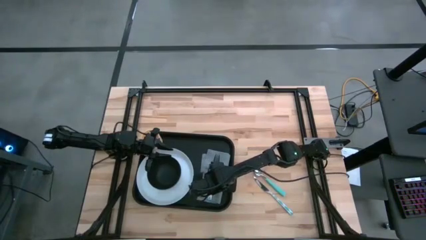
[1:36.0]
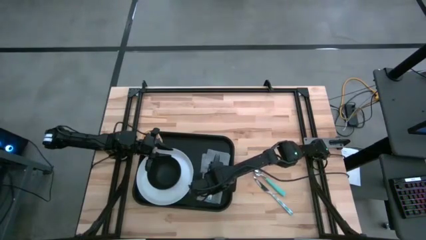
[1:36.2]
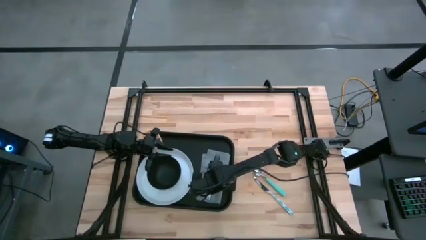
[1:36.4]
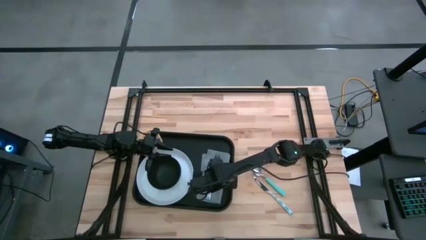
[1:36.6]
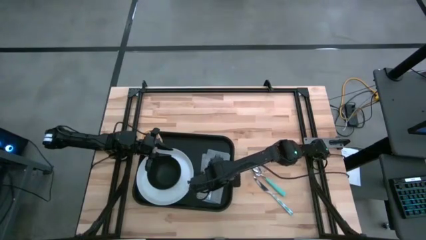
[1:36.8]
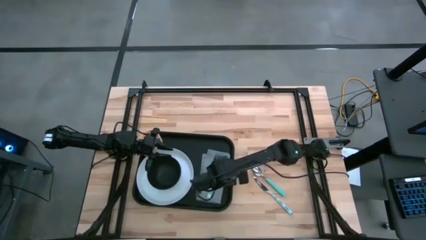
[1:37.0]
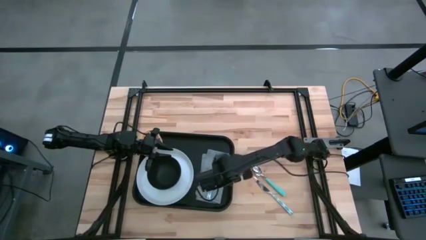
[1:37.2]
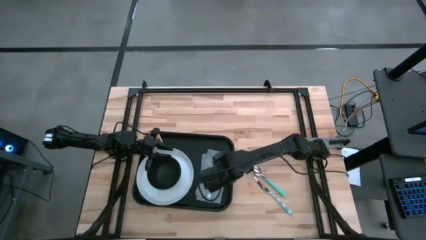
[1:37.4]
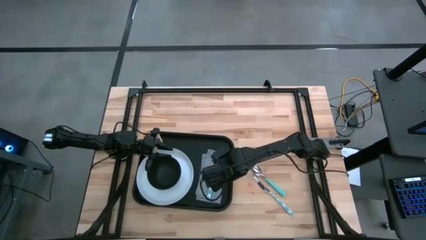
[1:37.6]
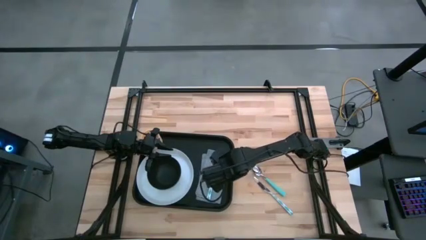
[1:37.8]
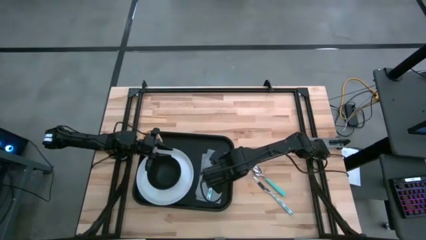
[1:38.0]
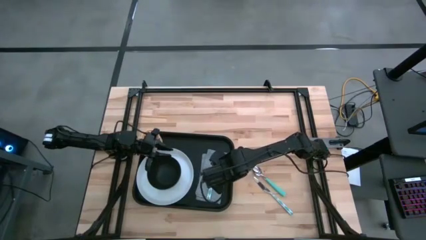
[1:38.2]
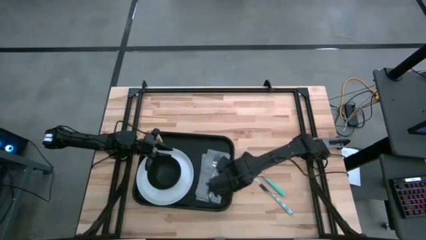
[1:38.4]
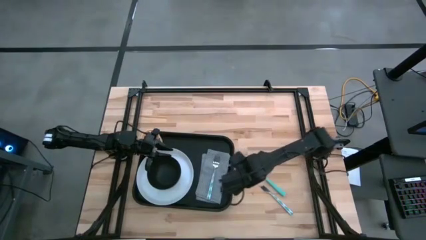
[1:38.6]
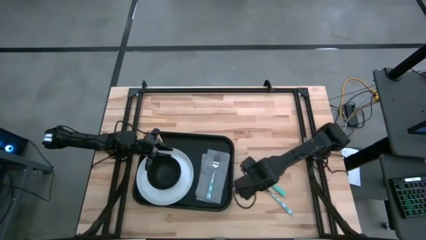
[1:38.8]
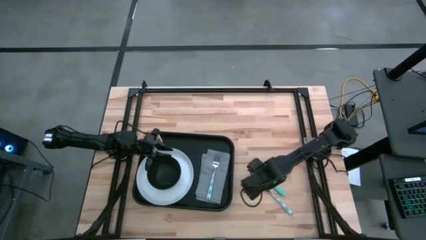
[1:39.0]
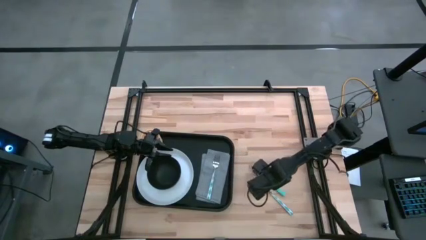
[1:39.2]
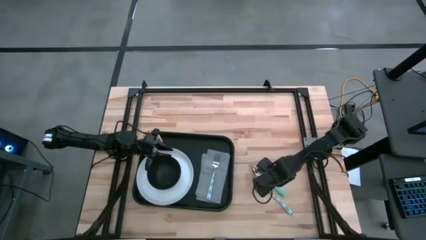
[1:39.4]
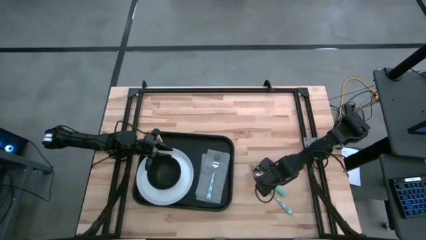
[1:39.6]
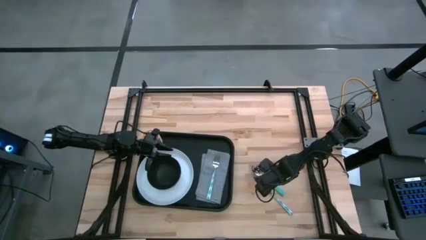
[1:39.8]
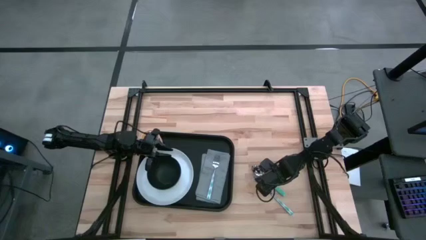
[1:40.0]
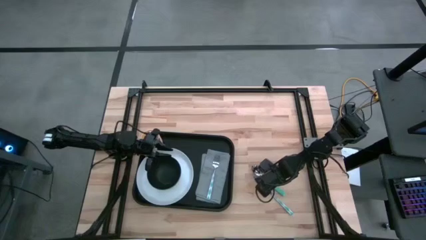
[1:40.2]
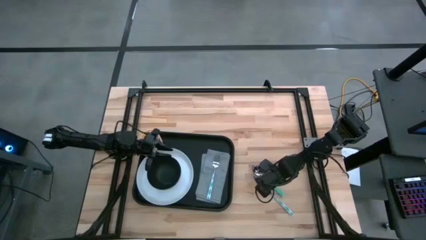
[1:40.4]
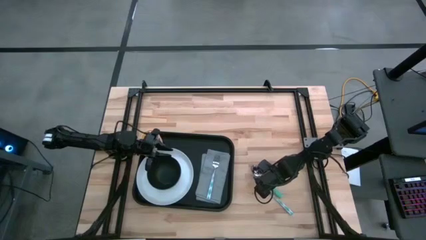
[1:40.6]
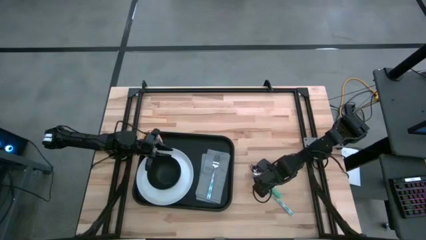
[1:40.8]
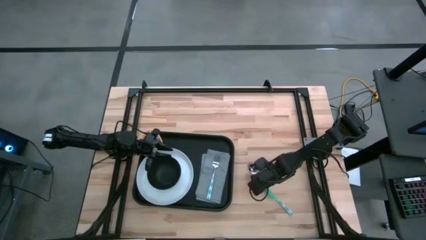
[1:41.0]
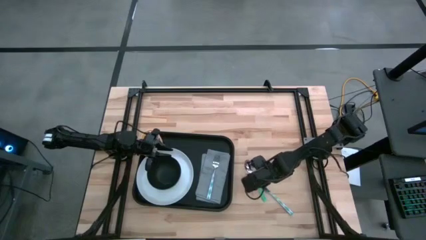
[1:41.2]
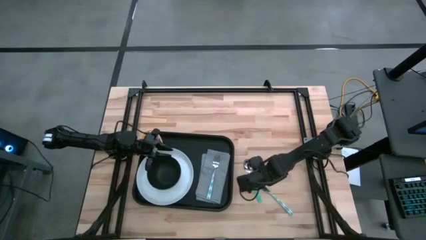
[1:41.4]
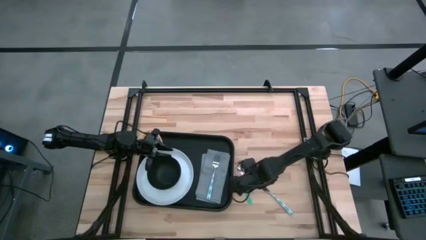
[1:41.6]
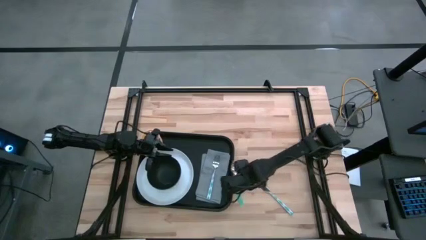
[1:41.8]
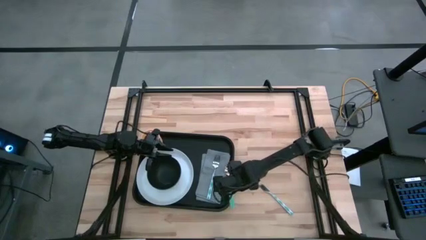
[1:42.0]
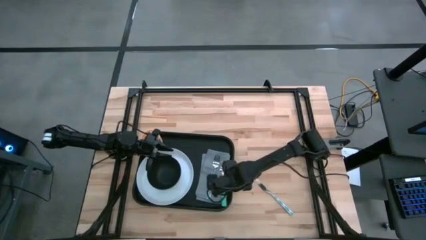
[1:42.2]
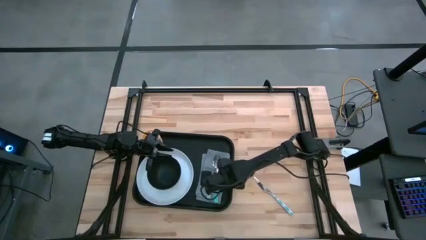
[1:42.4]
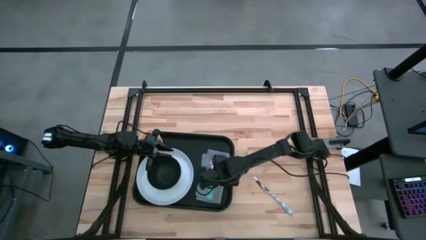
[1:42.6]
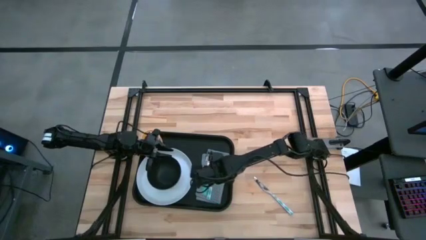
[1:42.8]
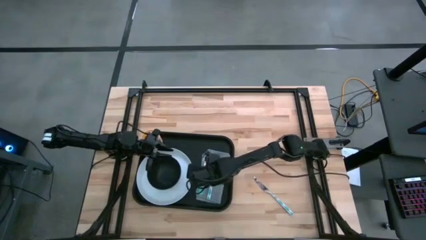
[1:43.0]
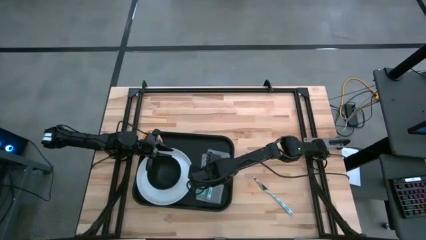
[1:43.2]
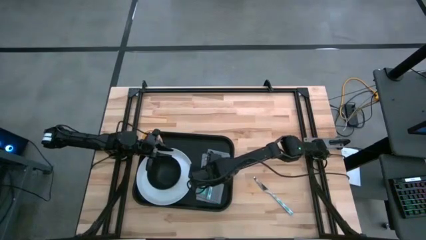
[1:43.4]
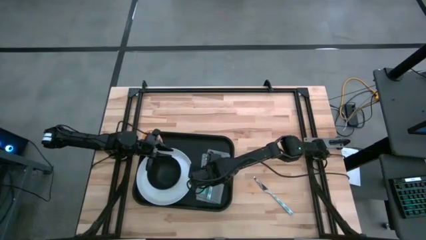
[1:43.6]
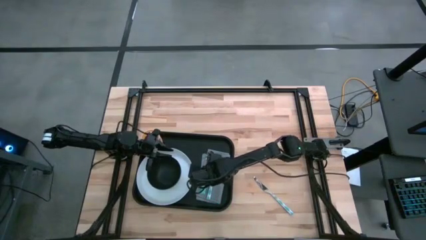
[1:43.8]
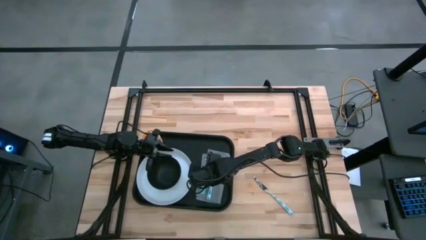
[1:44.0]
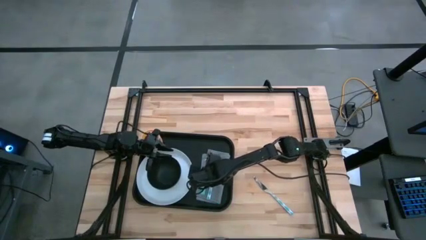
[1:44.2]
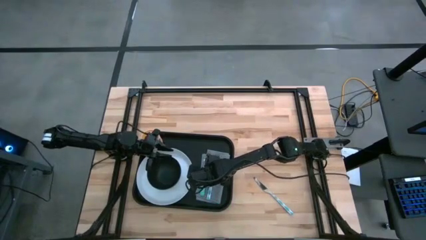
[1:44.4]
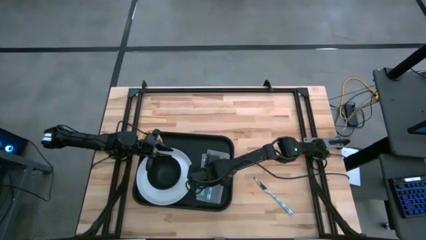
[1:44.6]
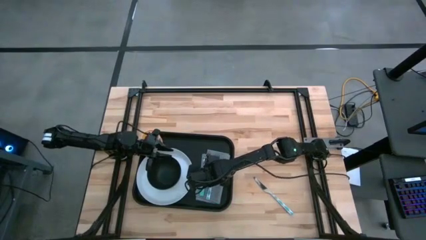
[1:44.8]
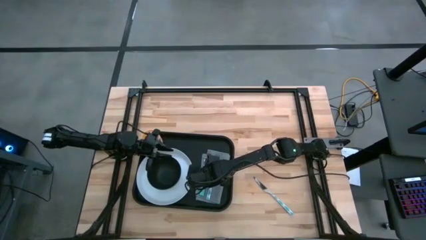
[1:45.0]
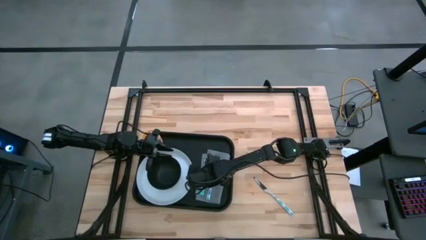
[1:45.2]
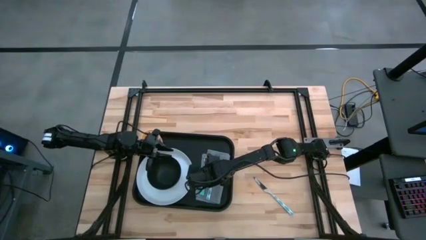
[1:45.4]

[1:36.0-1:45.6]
Task: Set up tray
Put the blue spoon on the gray napkin

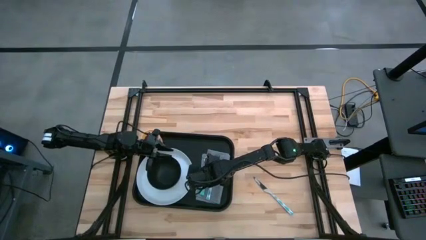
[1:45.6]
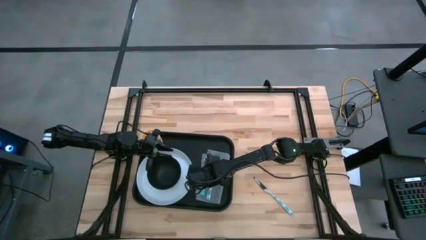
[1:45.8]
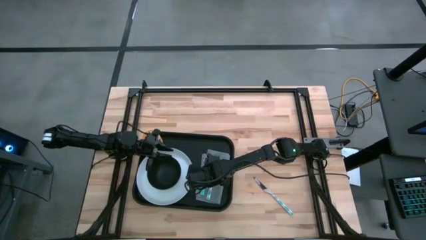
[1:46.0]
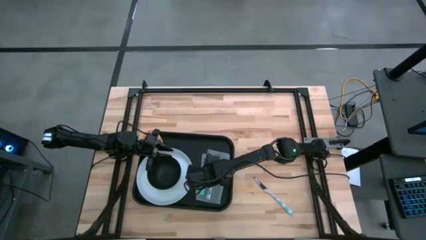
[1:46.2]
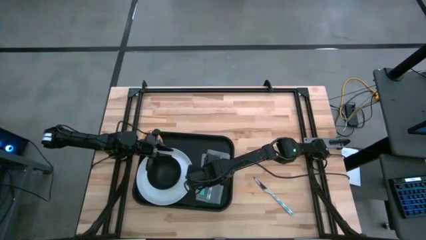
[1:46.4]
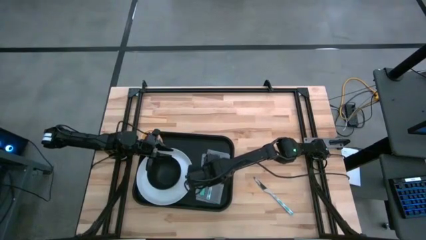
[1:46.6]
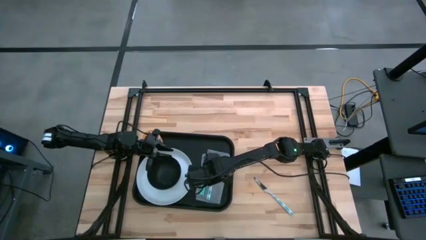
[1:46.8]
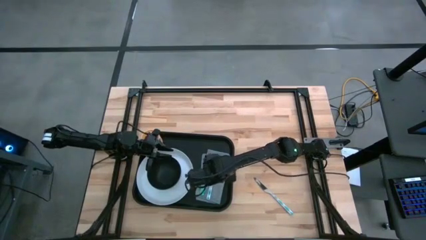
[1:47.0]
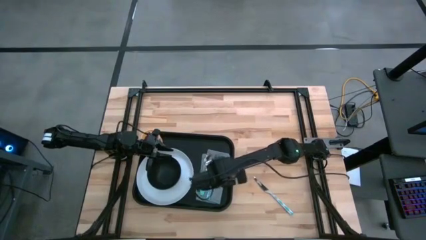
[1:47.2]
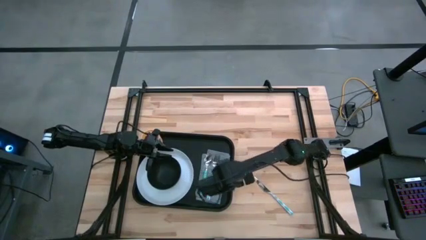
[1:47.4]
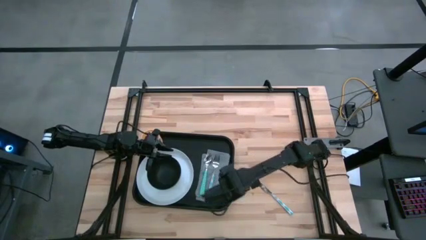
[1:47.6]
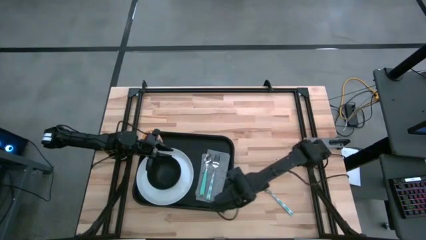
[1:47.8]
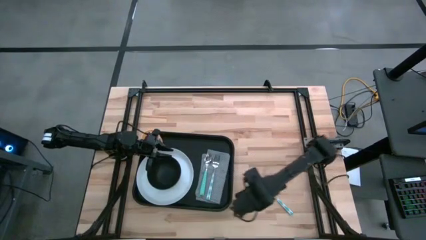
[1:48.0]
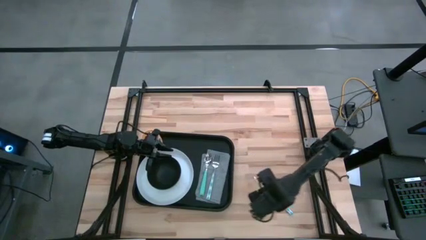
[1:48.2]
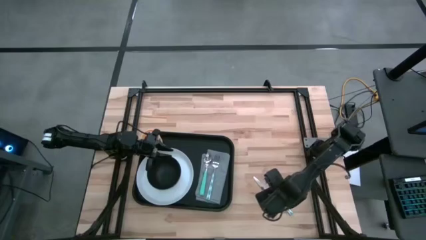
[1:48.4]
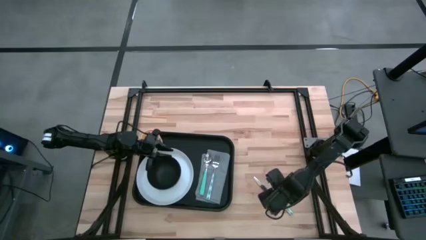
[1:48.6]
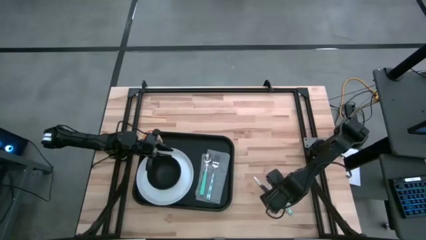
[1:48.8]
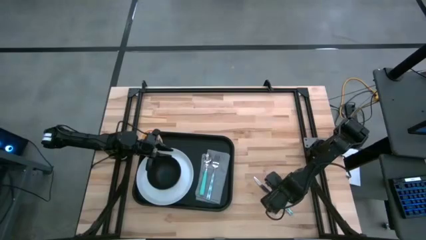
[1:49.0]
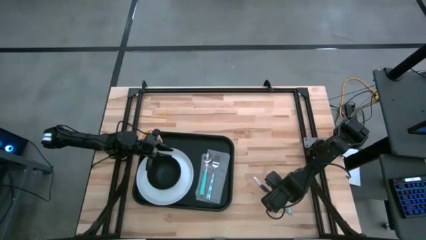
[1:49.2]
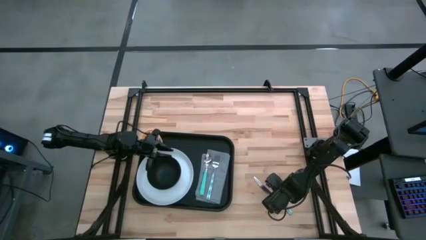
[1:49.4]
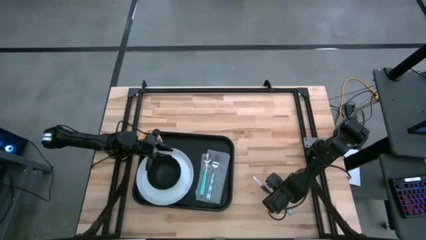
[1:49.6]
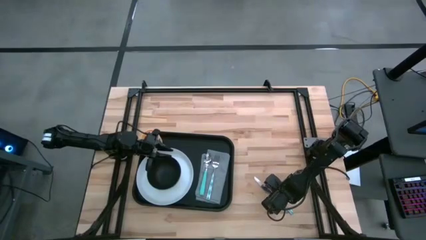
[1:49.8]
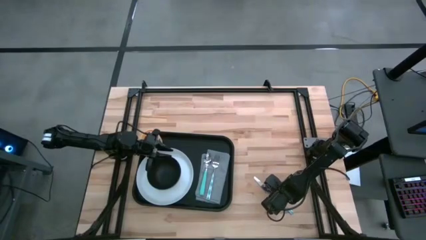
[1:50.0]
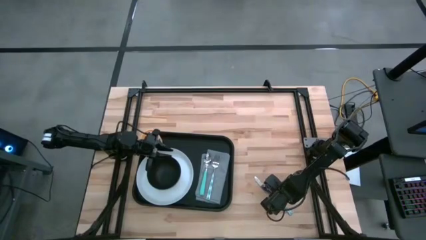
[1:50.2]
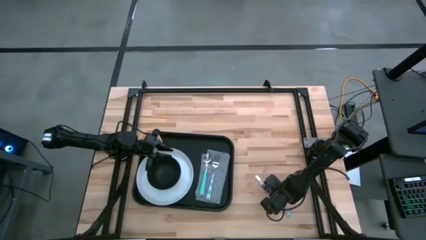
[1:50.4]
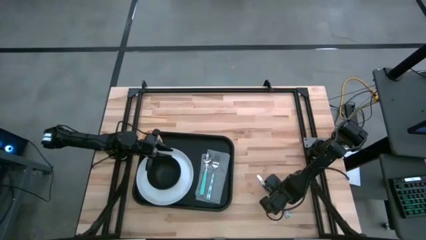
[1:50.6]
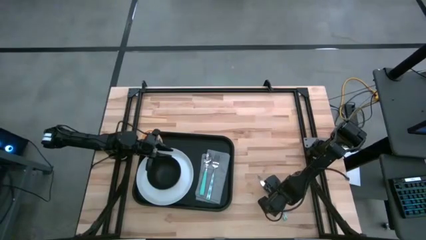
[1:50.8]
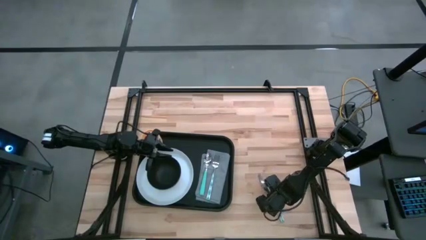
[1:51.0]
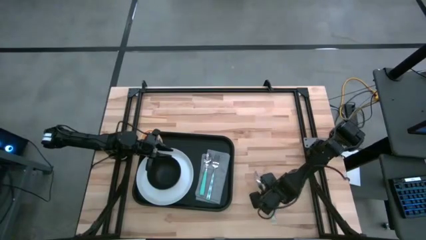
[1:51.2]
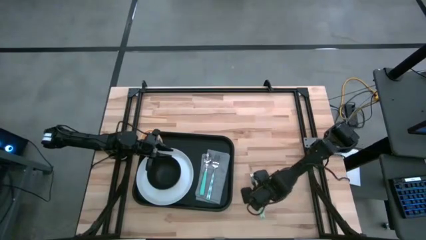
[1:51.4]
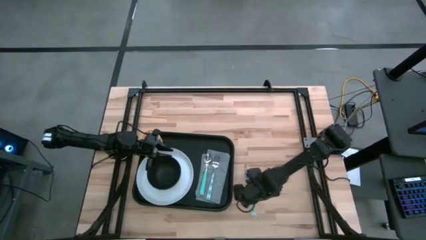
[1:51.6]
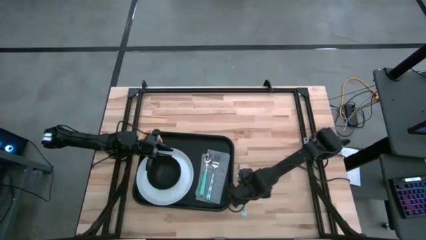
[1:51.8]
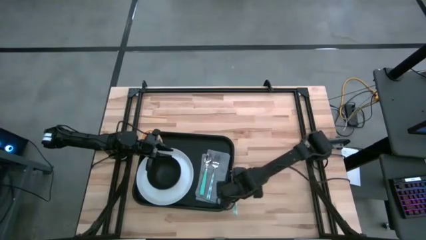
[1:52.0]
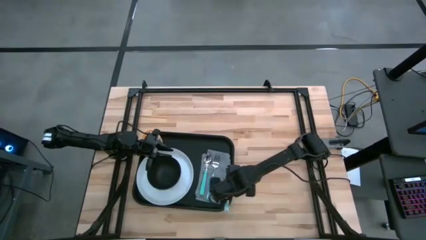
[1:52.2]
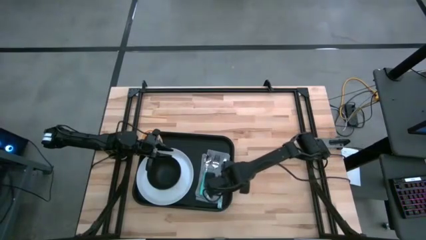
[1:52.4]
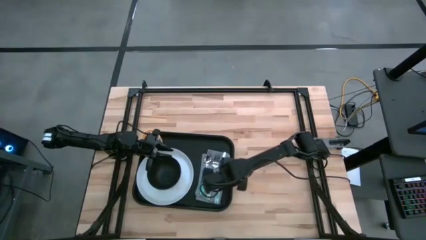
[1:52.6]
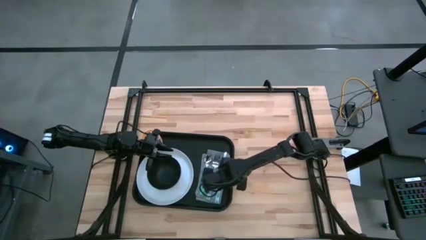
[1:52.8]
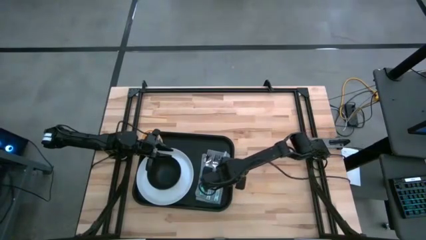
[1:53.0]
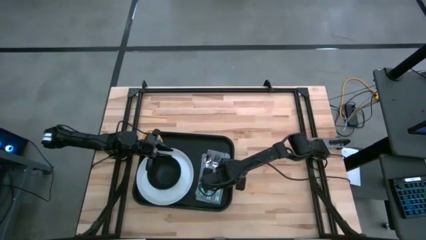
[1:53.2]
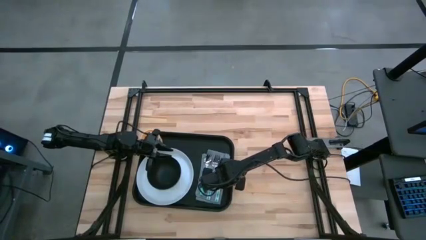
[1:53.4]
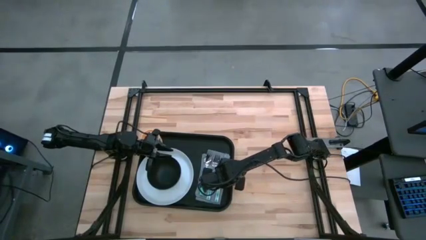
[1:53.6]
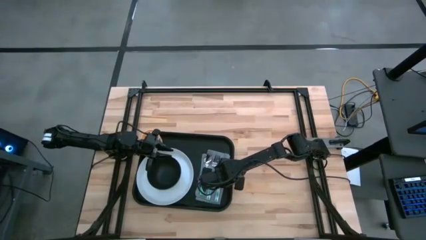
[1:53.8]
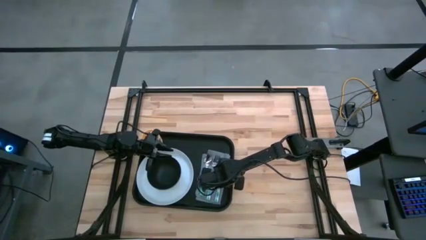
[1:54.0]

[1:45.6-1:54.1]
Put the white knife on the gray napkin
